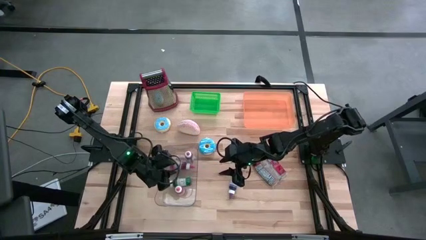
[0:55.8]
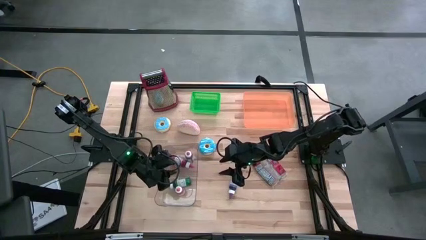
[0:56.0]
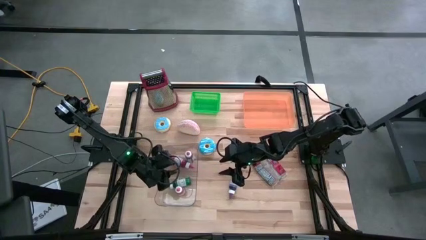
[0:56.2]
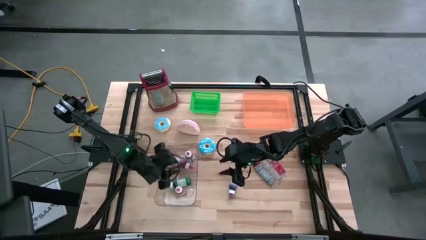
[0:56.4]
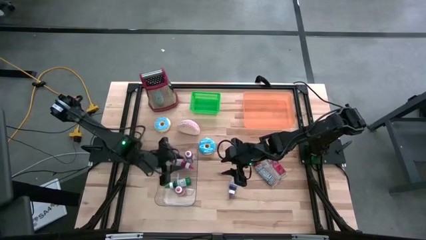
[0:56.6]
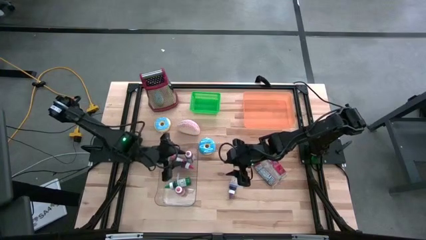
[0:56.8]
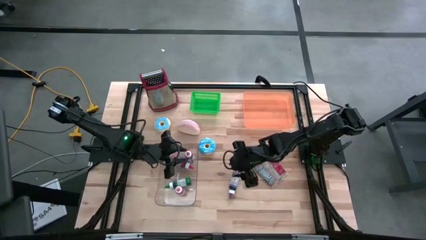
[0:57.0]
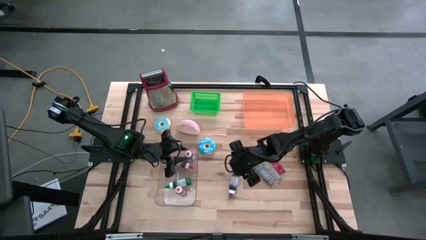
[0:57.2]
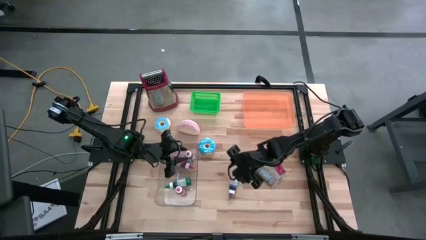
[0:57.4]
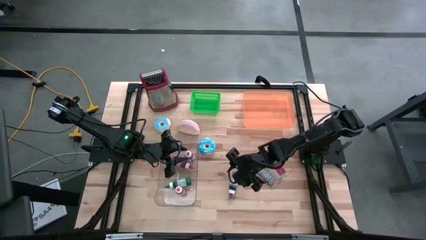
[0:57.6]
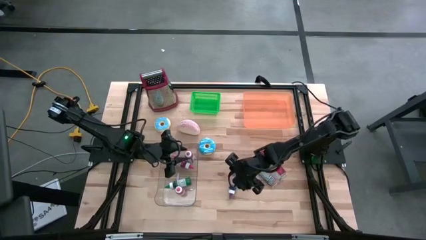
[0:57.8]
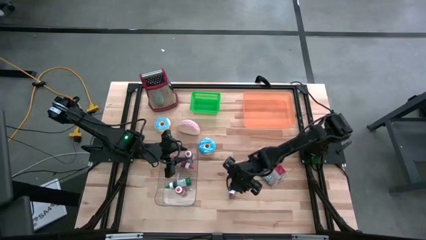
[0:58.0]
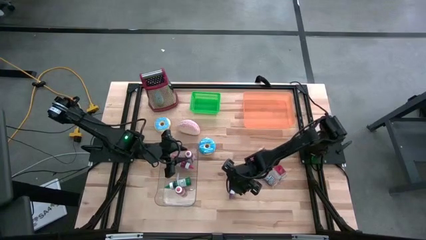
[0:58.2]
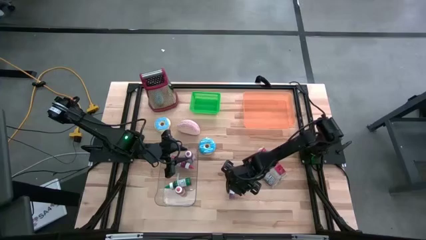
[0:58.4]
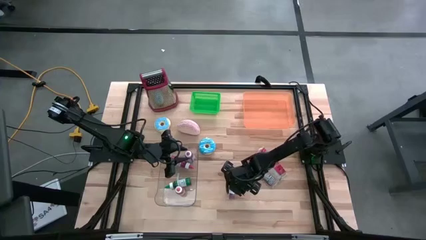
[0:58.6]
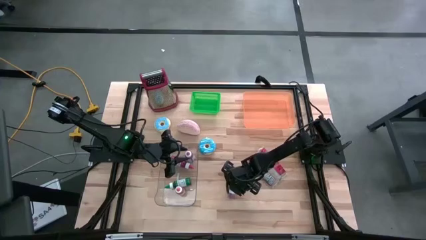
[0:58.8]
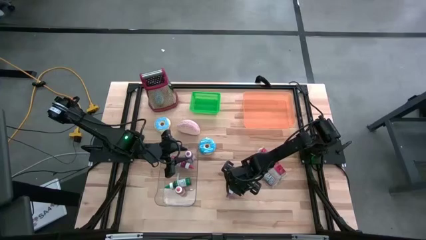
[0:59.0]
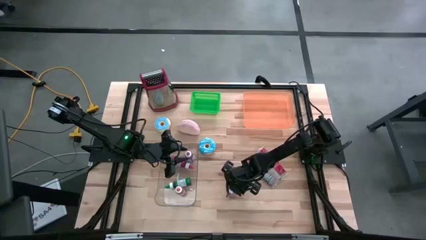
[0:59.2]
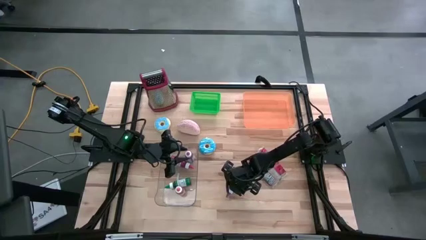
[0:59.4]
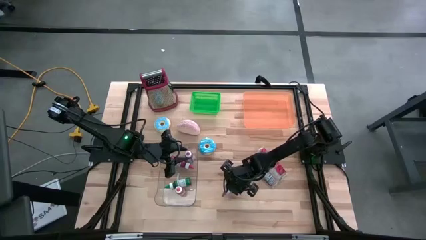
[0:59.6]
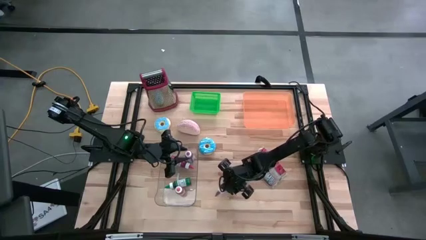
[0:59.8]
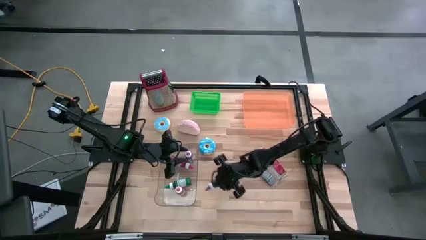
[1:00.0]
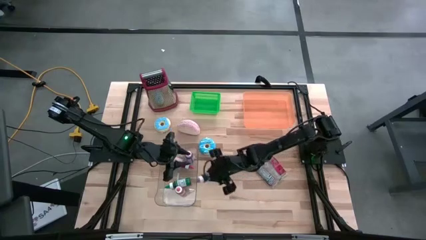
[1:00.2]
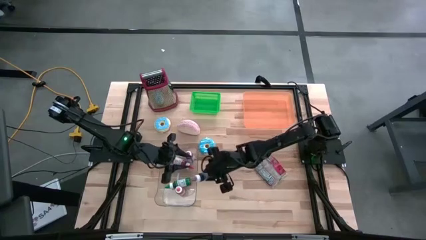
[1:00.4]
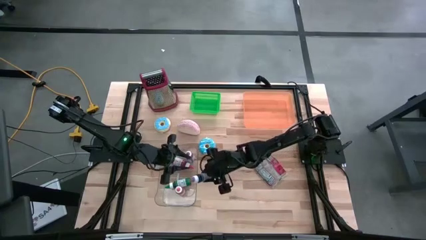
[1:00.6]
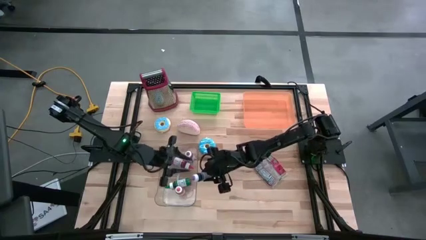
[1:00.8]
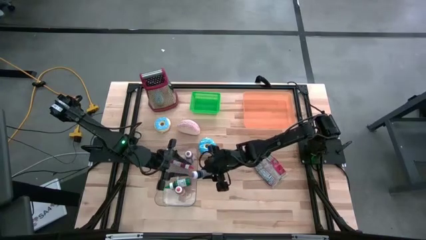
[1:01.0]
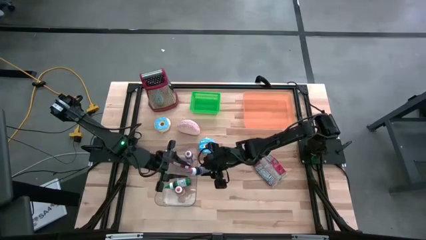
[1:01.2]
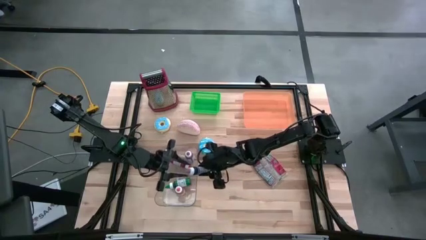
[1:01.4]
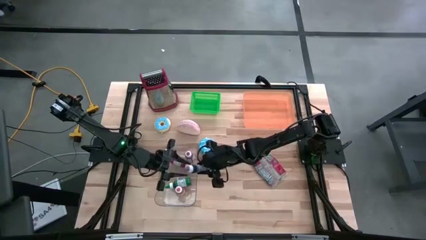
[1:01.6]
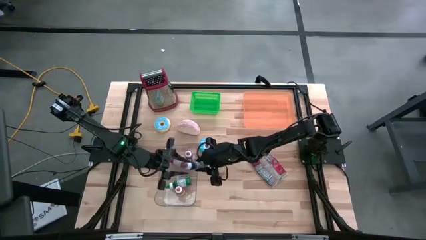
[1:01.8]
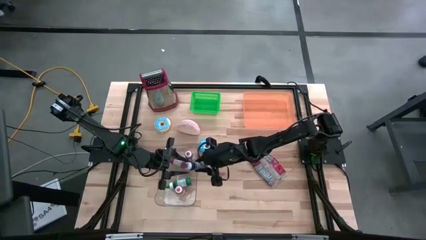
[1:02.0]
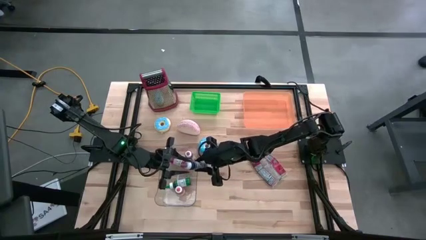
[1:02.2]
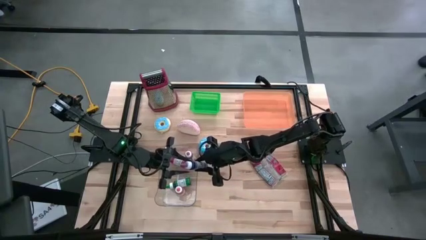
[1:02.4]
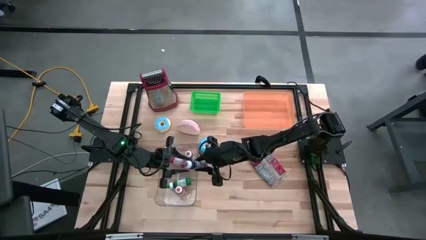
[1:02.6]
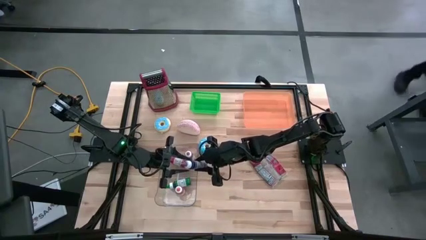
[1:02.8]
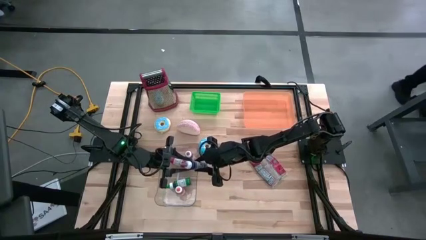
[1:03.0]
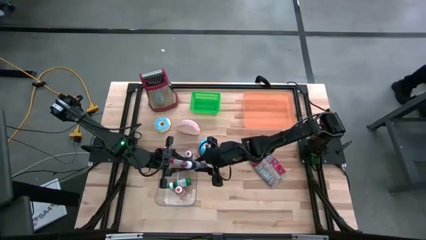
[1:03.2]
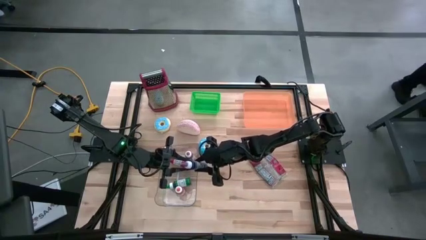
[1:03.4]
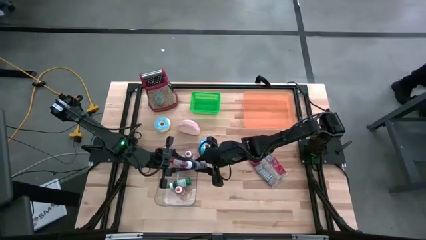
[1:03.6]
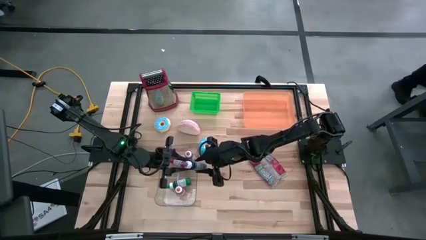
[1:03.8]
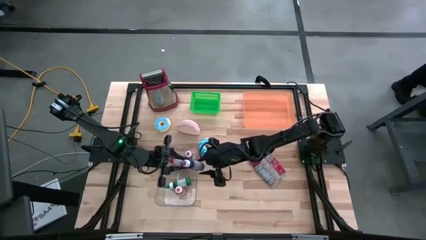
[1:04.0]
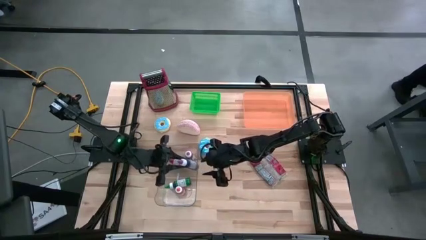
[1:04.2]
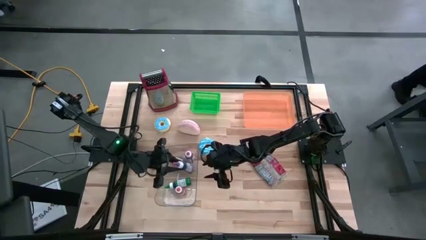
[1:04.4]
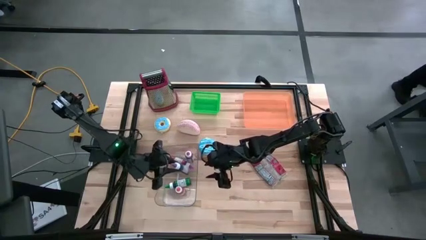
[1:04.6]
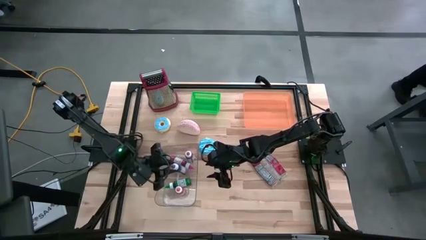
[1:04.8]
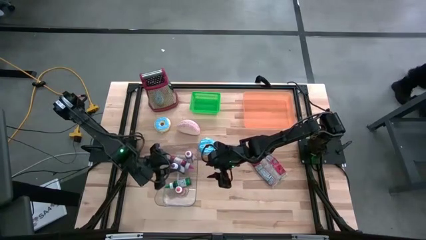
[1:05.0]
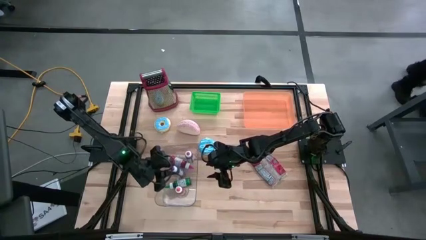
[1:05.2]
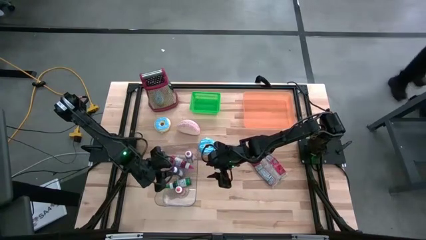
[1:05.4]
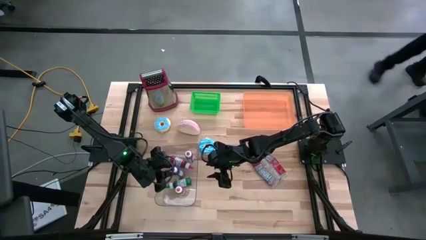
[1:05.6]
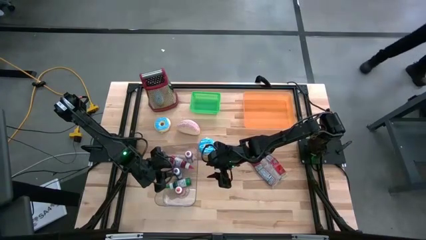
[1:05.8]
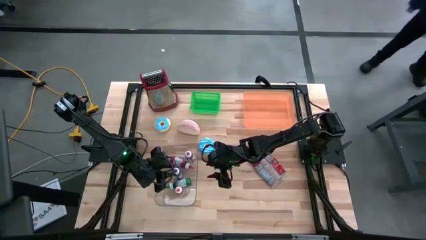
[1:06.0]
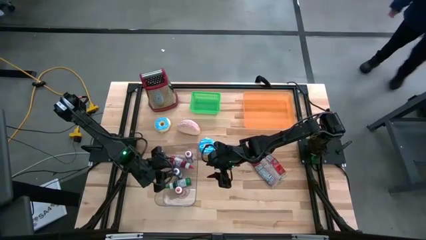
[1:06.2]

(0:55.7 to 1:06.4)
Put the violet food coloring bottle into the transparent bin

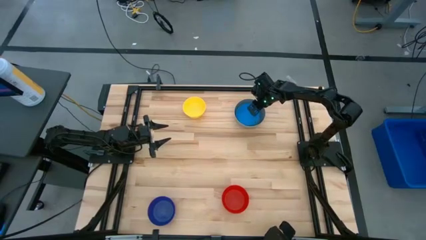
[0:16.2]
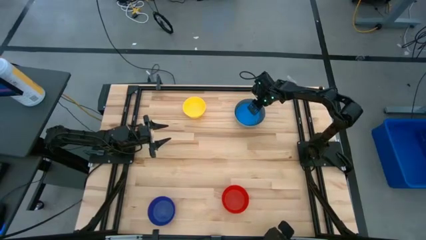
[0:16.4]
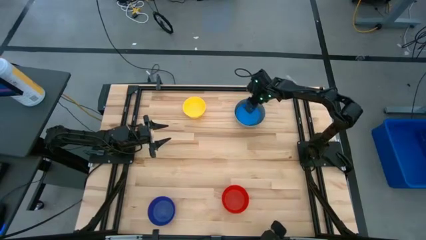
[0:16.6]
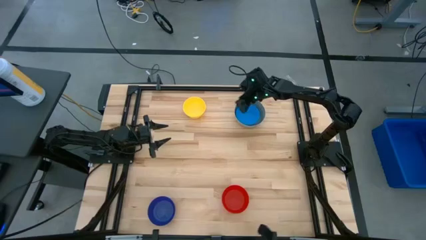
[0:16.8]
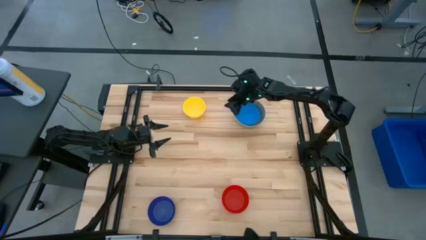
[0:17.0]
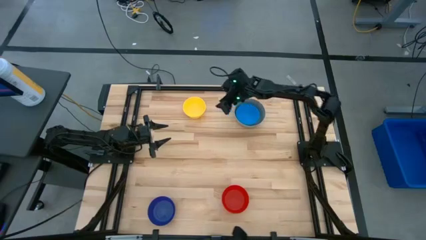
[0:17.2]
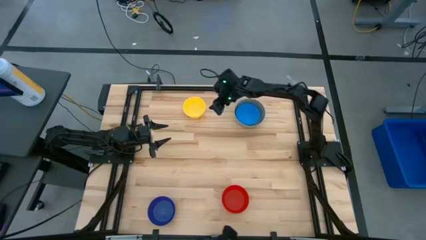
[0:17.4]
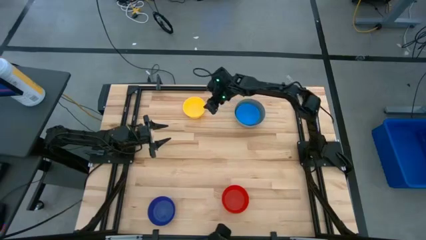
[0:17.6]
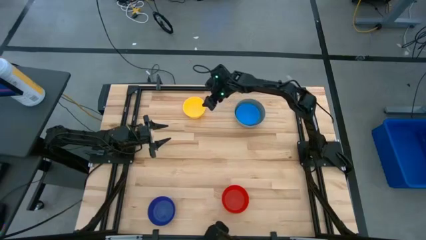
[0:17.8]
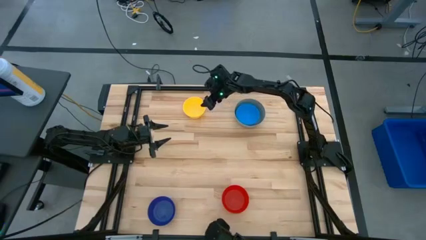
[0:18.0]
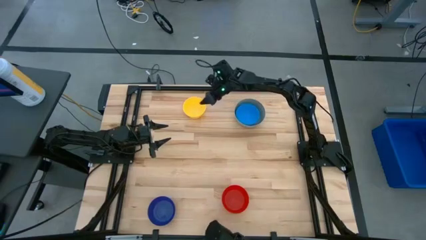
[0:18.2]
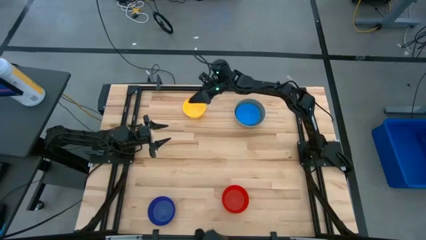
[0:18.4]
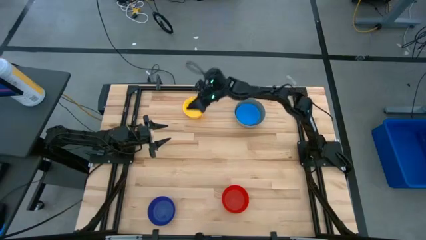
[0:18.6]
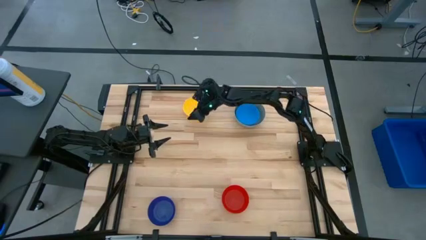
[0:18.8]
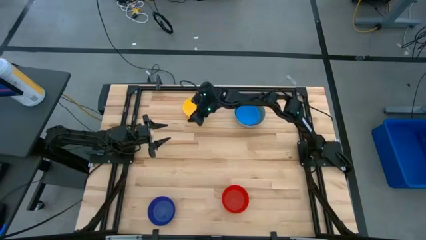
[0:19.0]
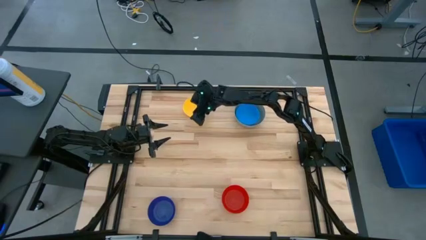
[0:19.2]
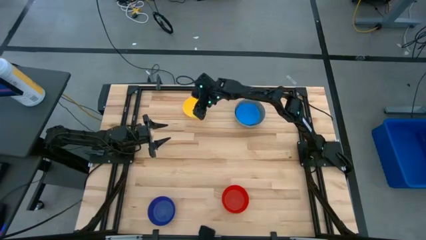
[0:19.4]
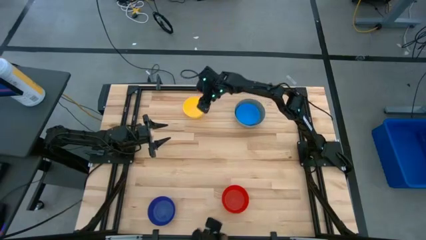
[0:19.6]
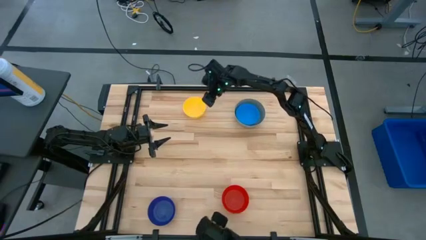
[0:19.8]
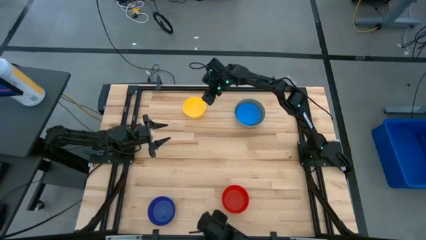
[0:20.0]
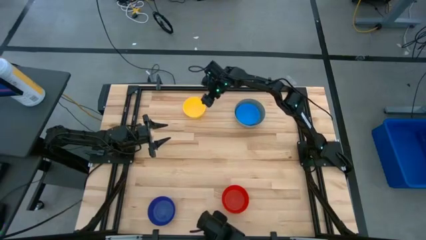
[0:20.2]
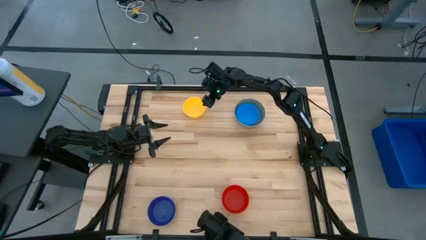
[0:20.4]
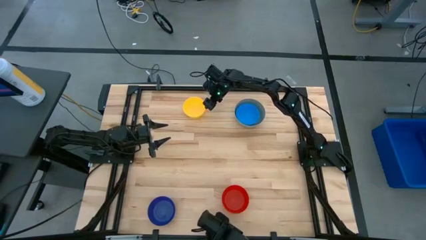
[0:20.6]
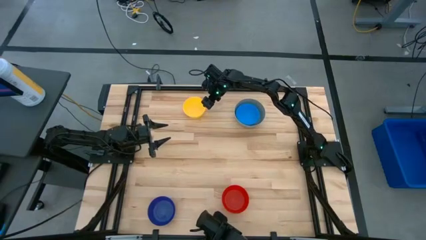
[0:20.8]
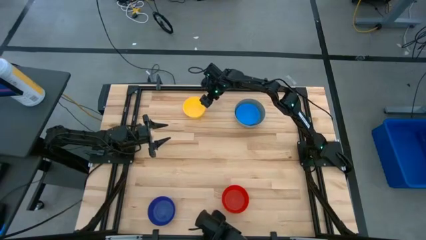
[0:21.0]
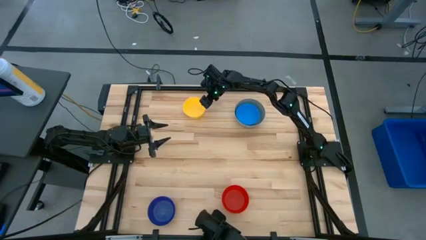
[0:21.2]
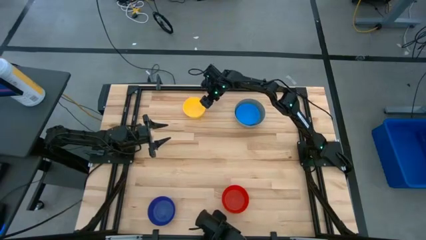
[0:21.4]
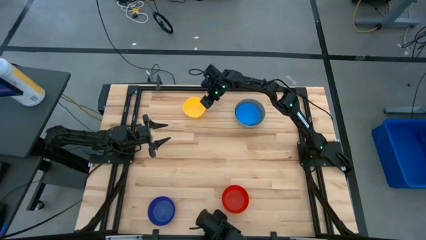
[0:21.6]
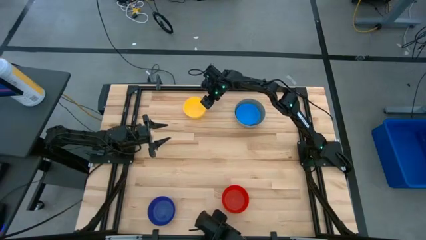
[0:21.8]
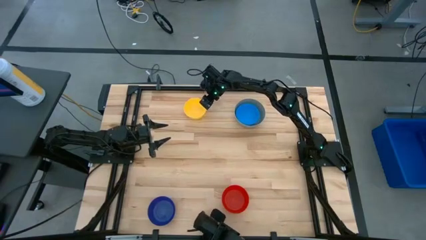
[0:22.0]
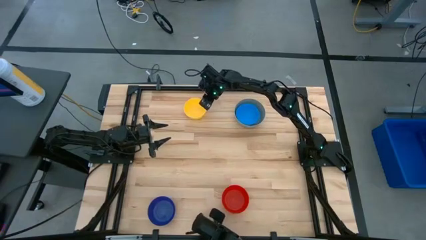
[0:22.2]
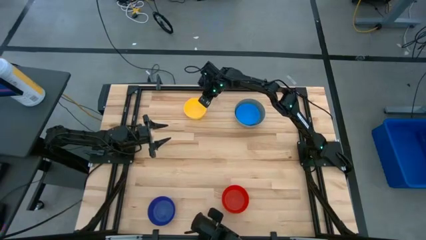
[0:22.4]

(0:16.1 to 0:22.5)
Stack the yellow bowl on the blue bowl
